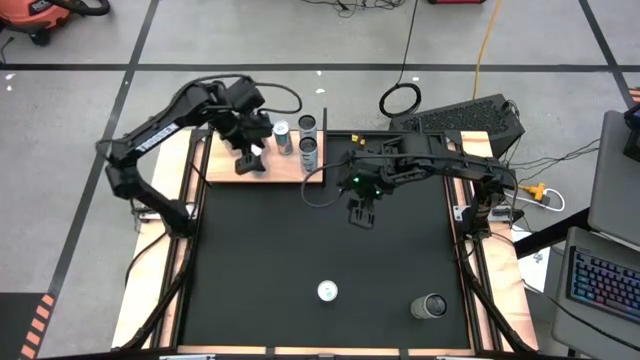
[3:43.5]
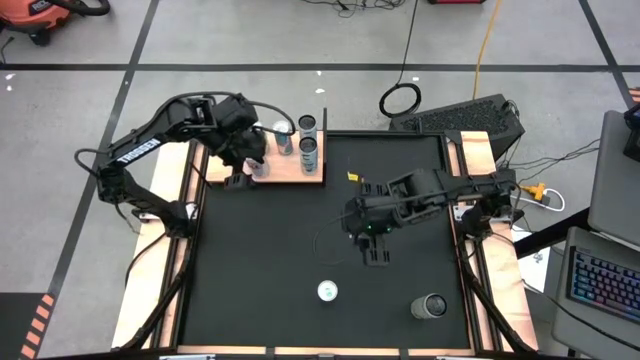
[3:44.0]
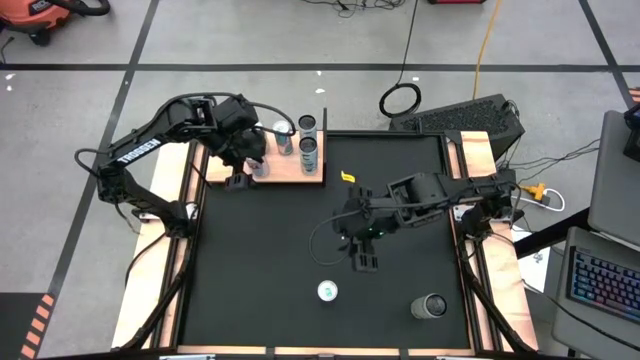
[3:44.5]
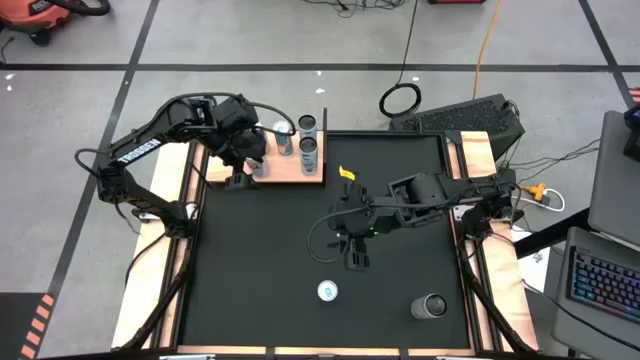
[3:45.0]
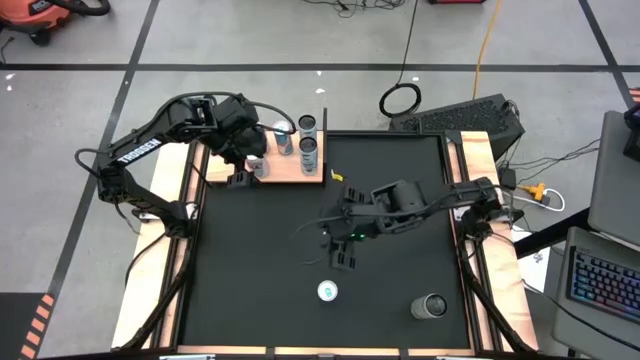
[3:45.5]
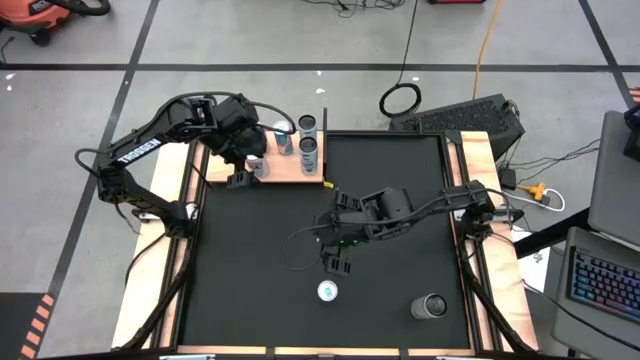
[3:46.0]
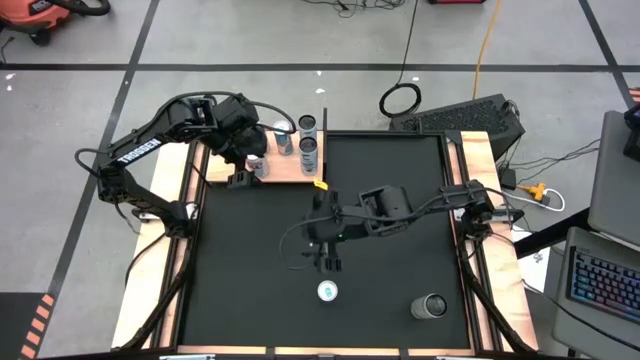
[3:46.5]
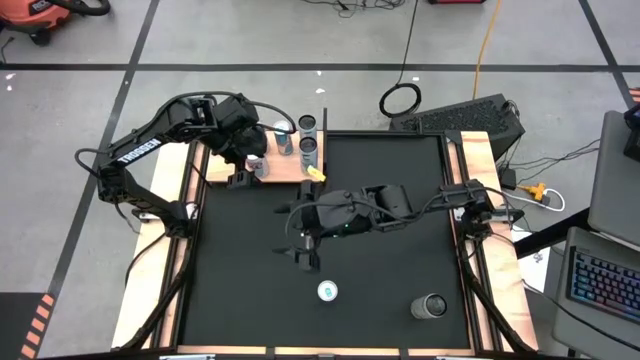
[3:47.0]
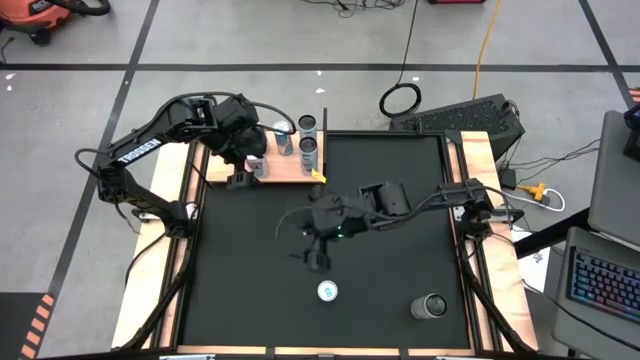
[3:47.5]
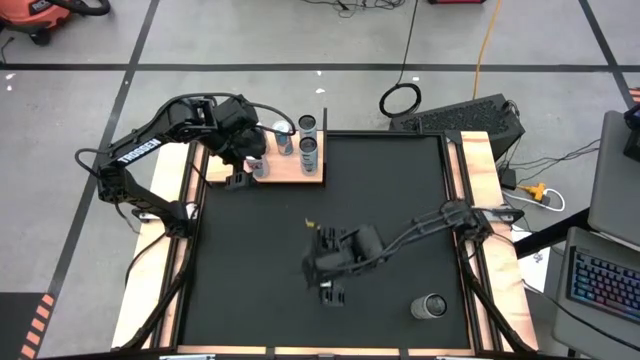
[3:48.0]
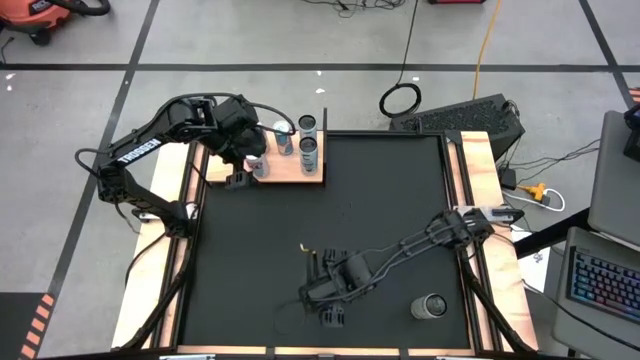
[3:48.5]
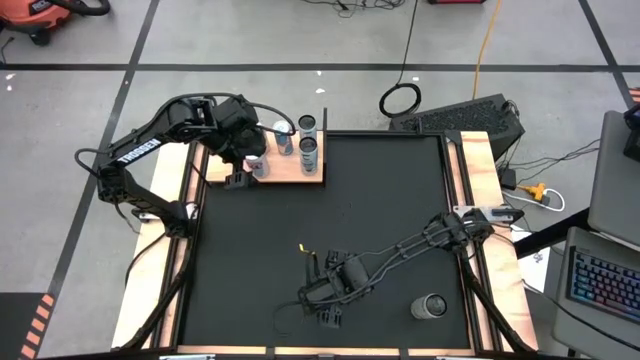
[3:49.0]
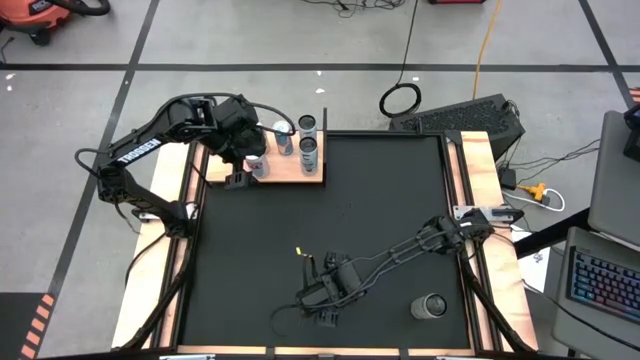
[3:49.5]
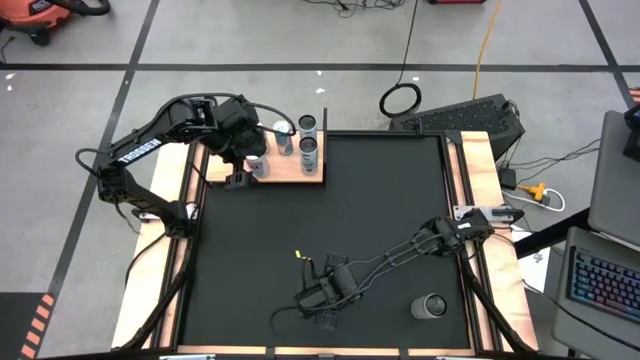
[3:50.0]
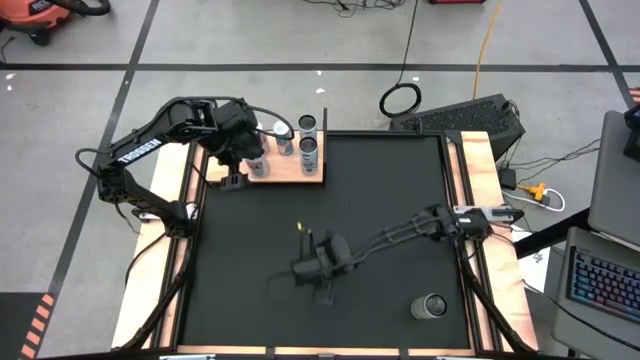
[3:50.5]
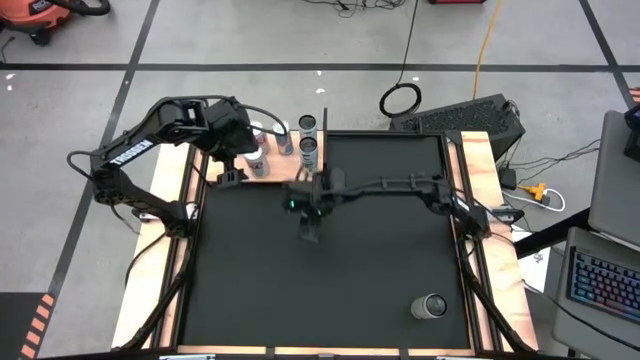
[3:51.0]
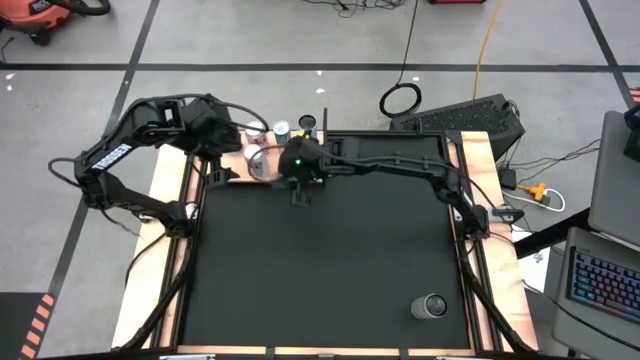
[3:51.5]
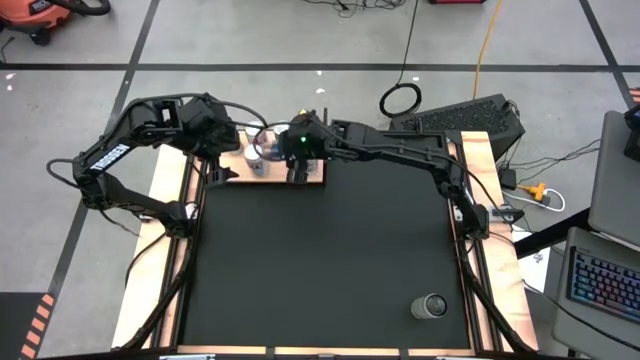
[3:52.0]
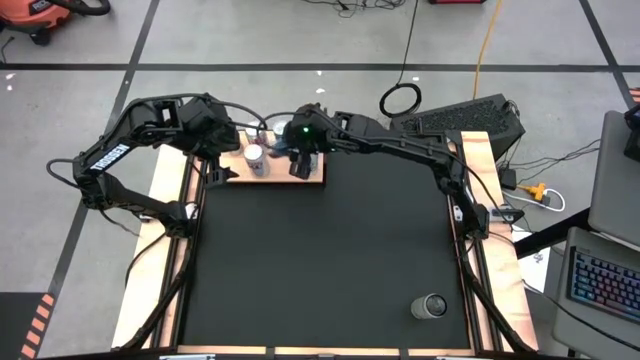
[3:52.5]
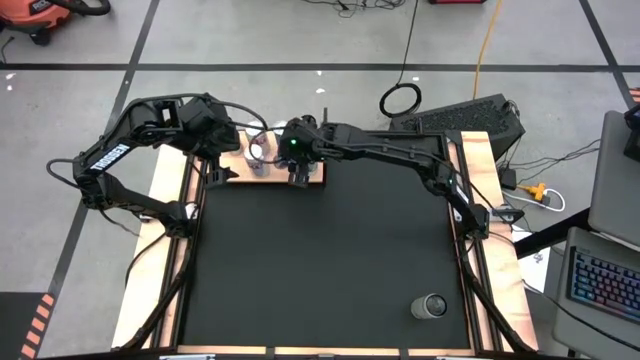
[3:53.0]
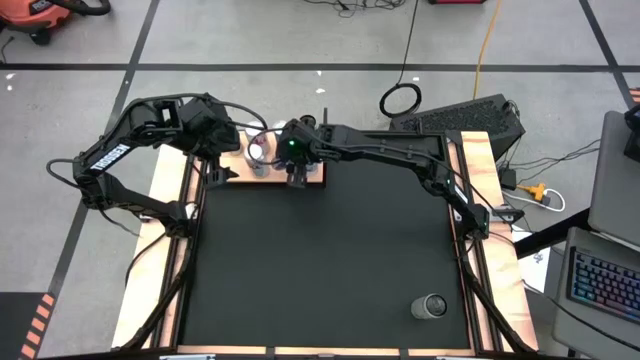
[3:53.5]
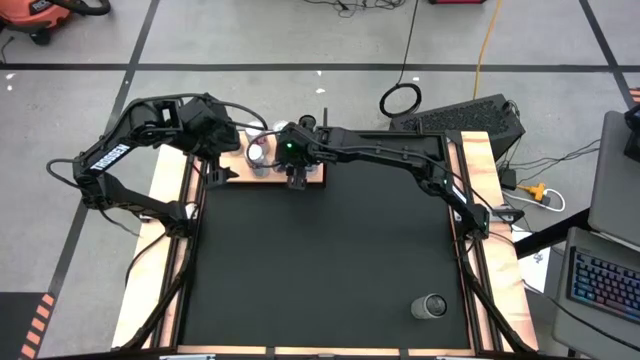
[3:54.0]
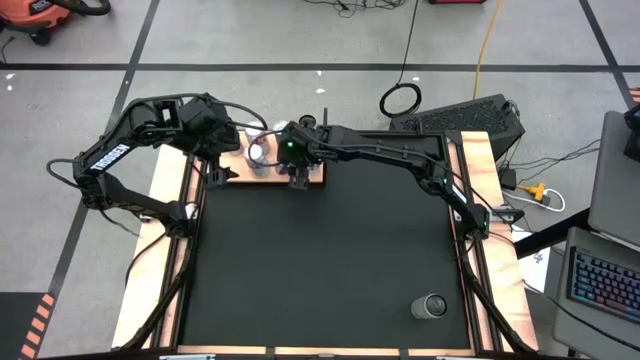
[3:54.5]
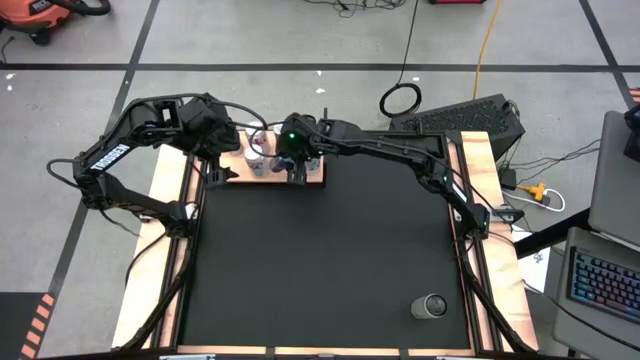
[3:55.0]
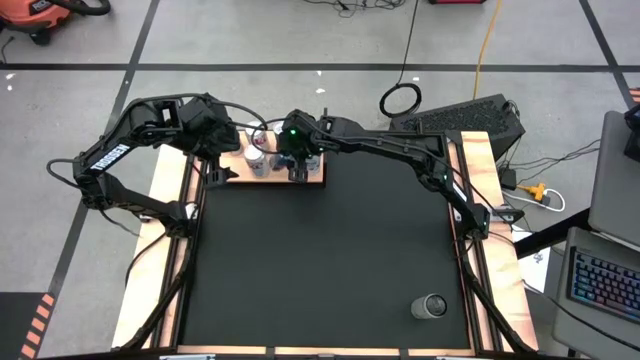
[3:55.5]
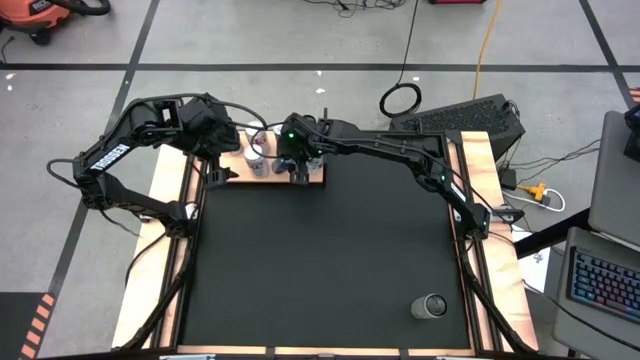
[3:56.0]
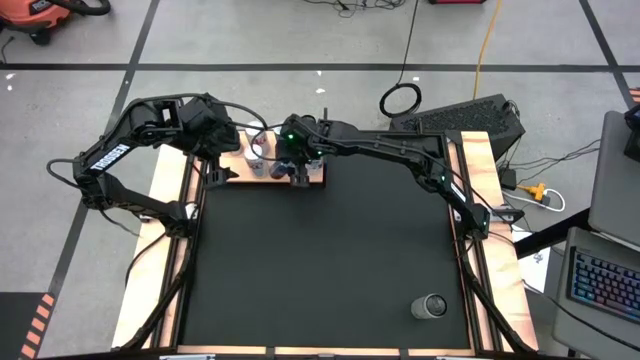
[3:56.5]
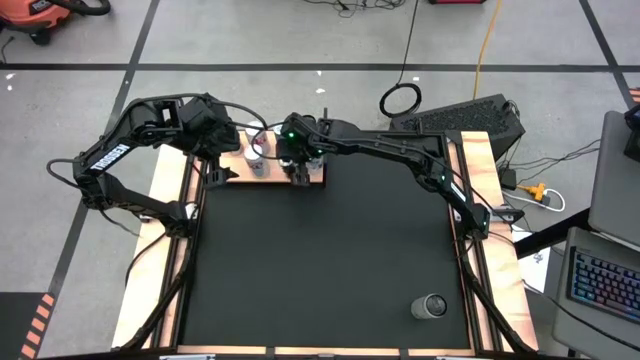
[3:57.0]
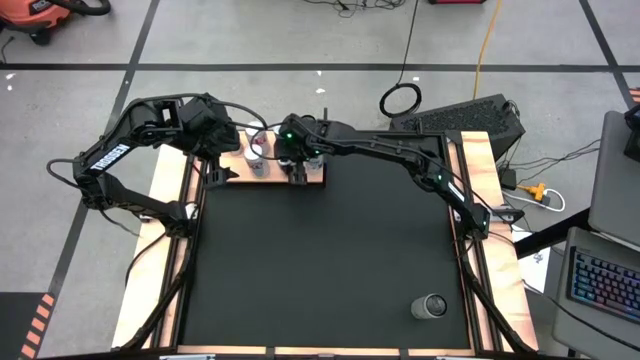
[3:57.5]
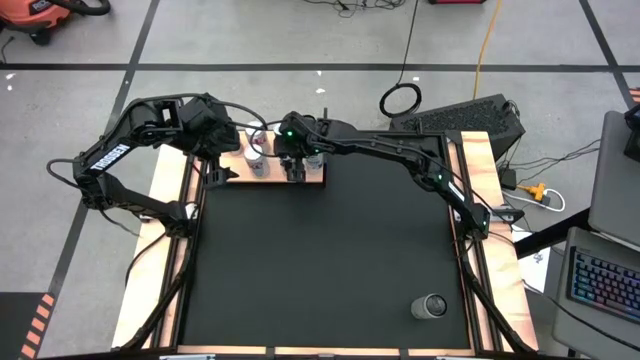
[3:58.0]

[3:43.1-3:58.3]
Task: Place canned beverage on shelf
Align the blue soda can on the shelf with the other blue soda can on the shelf

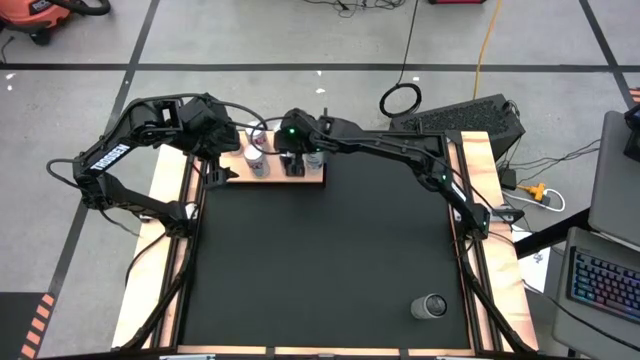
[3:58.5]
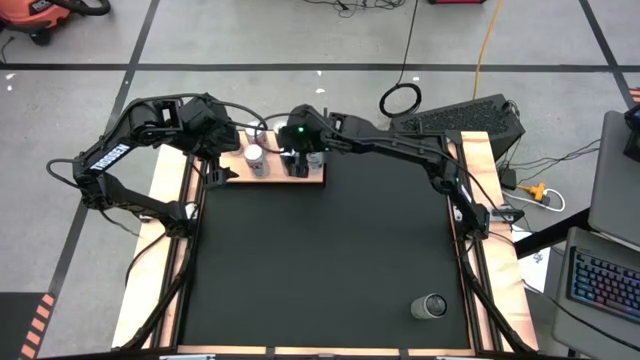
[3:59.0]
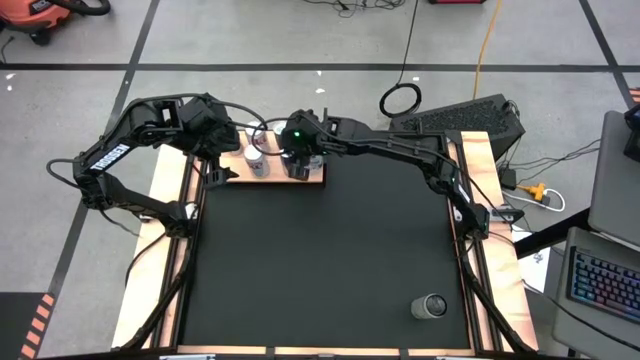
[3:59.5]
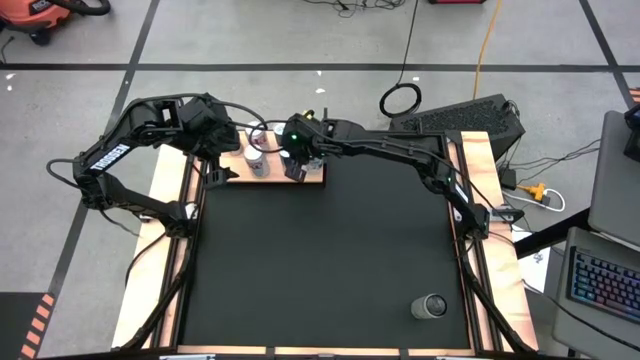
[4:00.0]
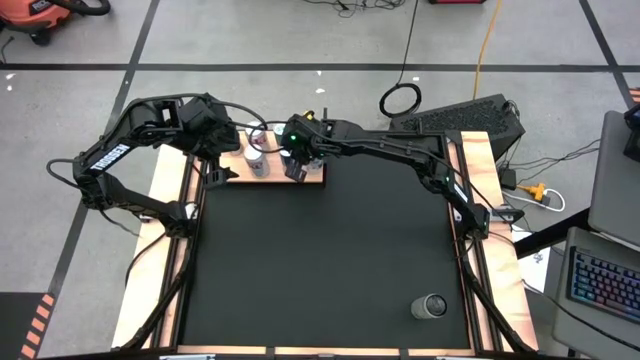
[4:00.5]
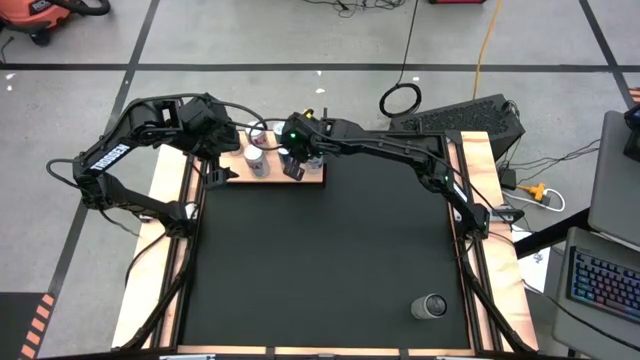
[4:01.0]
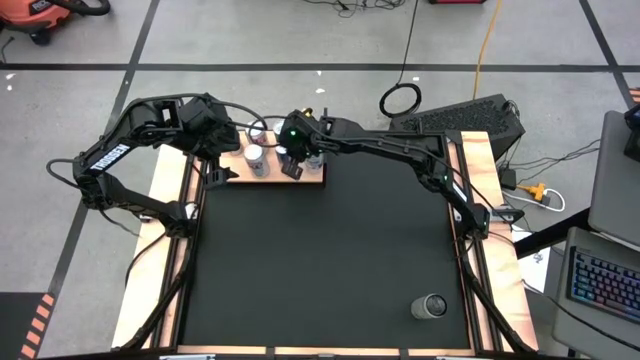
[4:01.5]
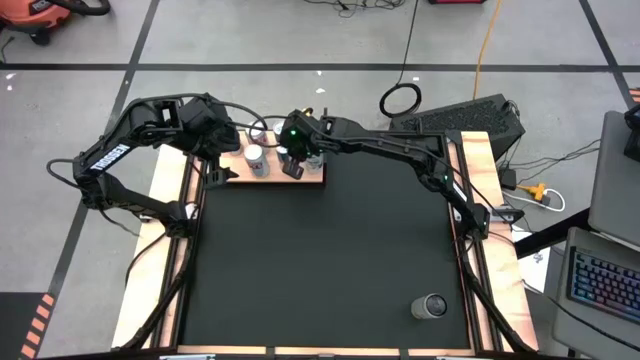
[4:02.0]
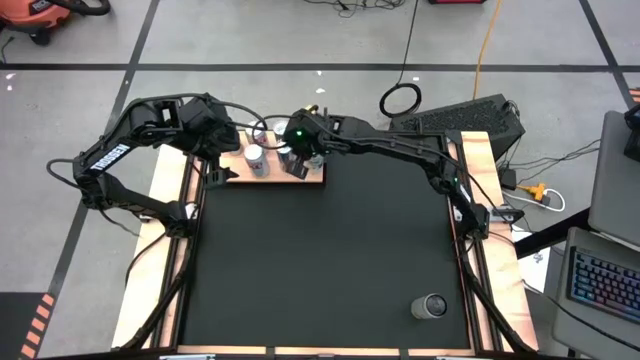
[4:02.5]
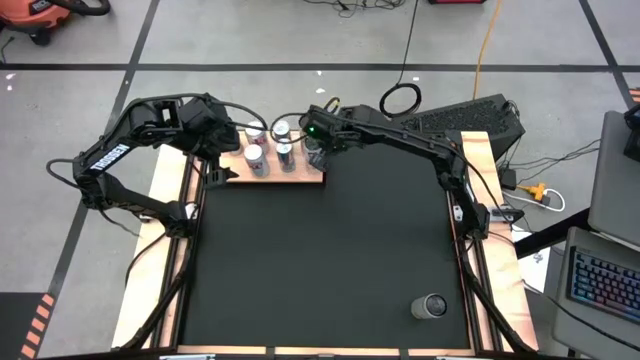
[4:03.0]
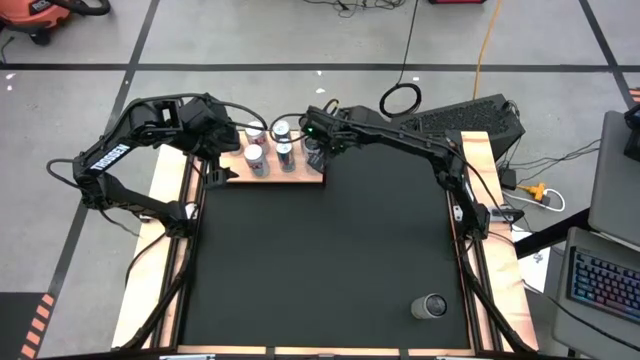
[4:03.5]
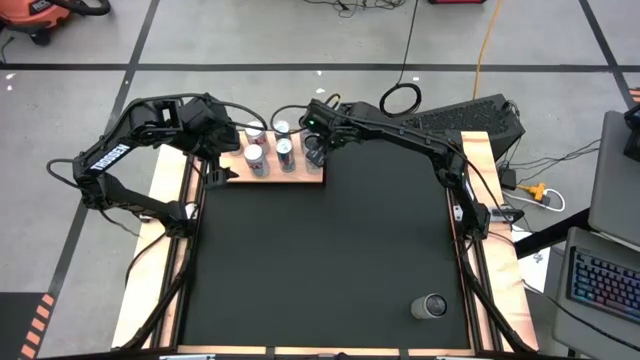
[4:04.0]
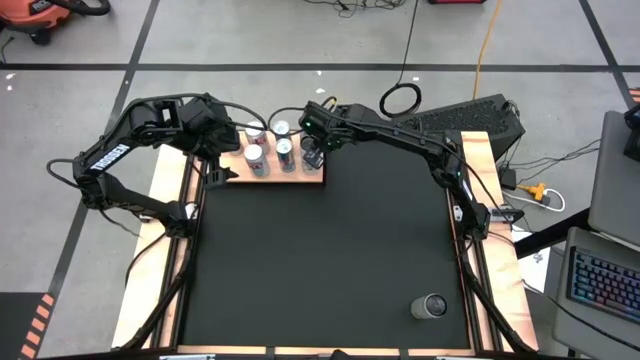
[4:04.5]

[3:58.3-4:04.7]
Adjust the soda cans on the shelf
